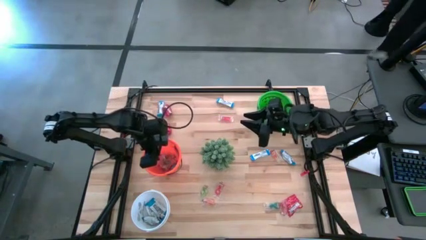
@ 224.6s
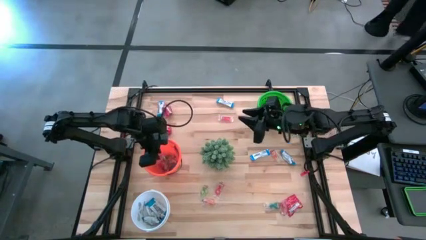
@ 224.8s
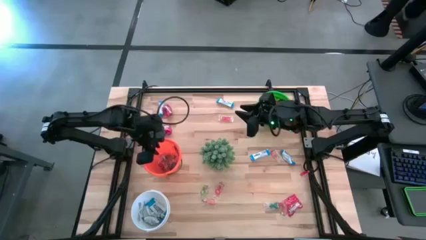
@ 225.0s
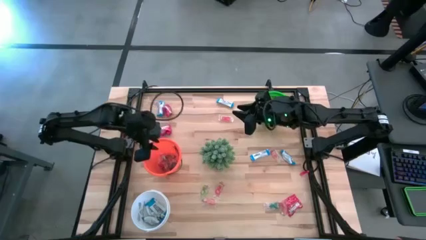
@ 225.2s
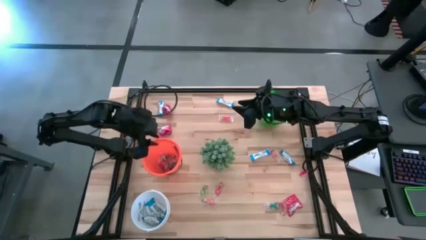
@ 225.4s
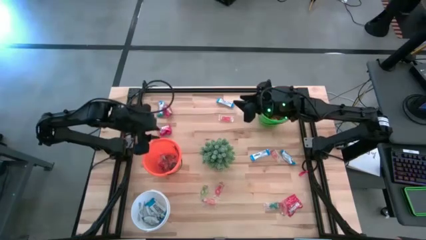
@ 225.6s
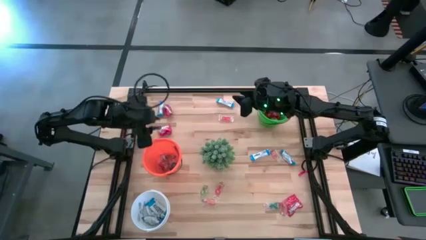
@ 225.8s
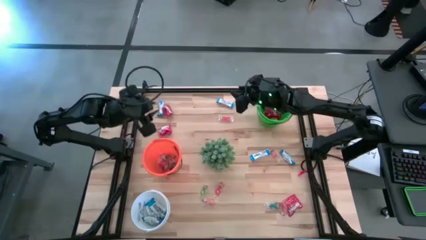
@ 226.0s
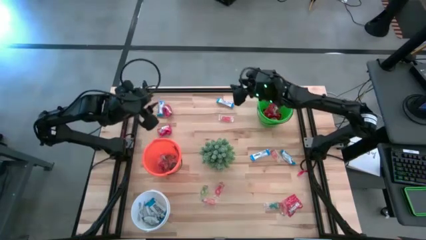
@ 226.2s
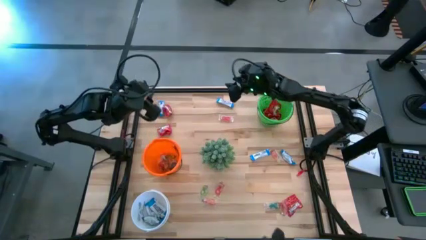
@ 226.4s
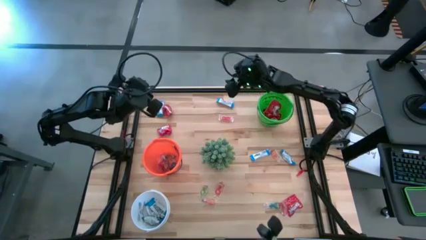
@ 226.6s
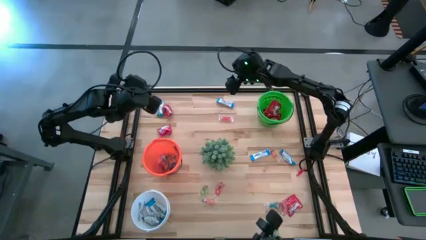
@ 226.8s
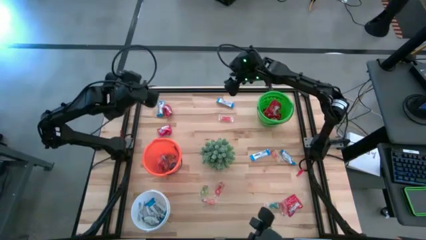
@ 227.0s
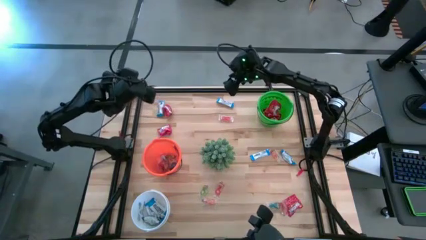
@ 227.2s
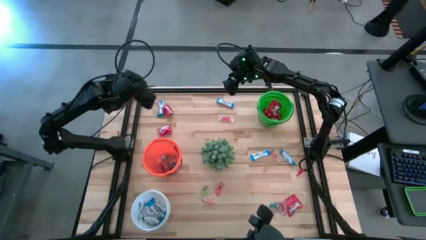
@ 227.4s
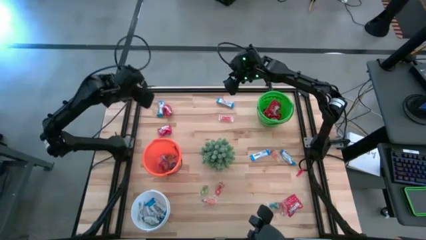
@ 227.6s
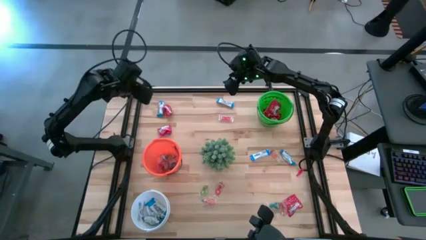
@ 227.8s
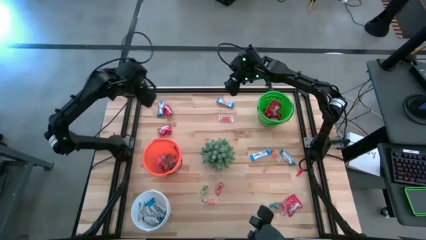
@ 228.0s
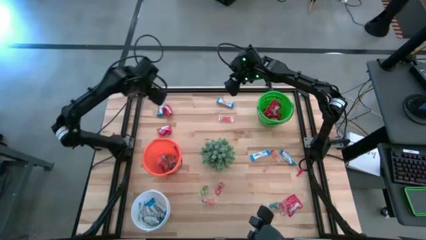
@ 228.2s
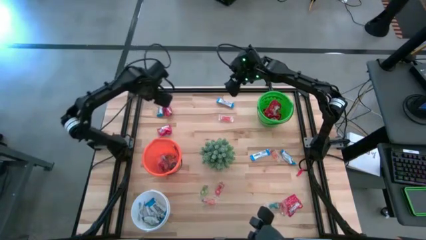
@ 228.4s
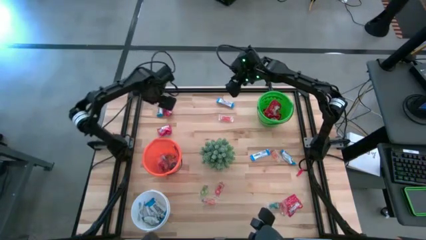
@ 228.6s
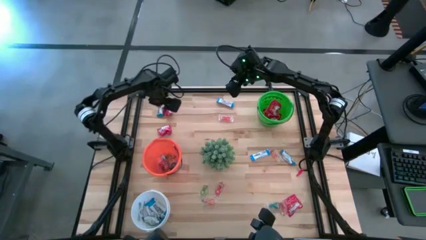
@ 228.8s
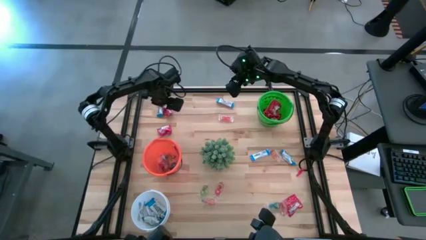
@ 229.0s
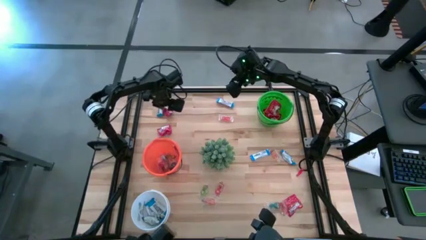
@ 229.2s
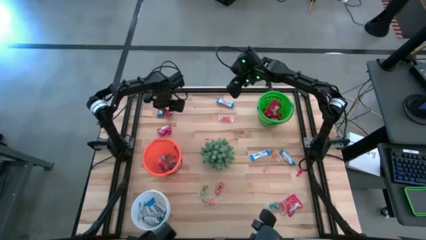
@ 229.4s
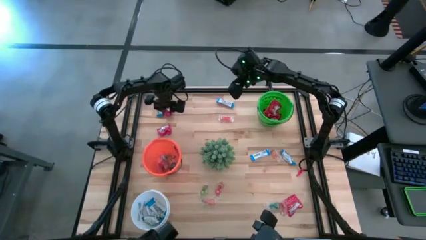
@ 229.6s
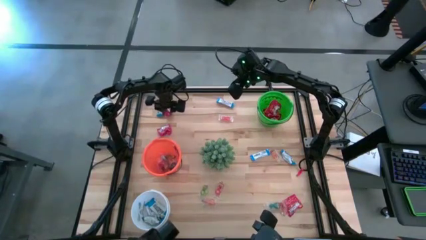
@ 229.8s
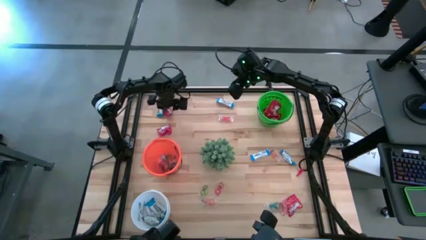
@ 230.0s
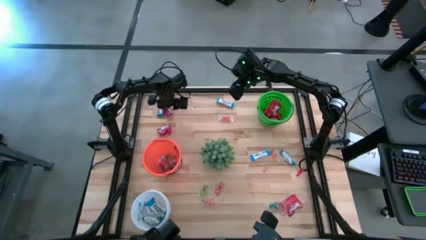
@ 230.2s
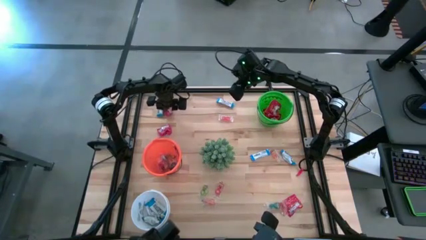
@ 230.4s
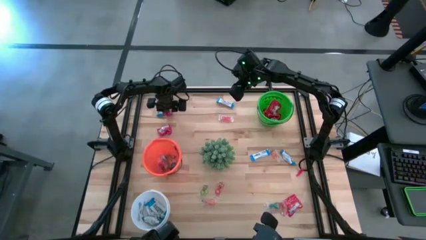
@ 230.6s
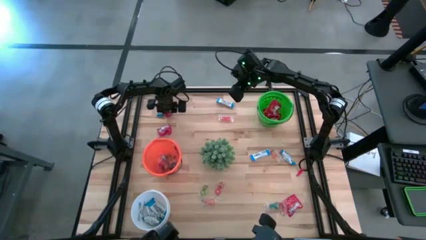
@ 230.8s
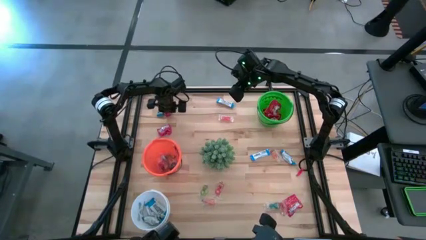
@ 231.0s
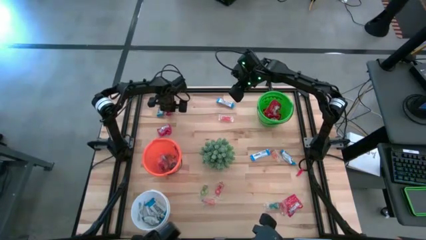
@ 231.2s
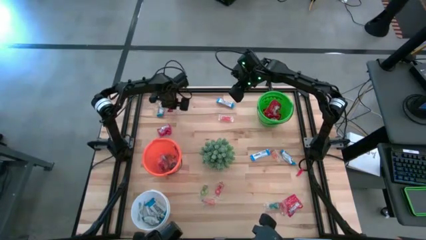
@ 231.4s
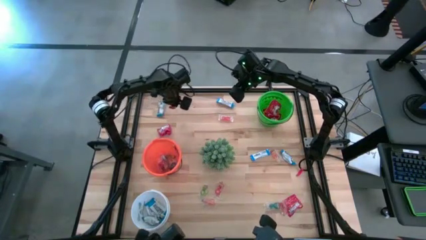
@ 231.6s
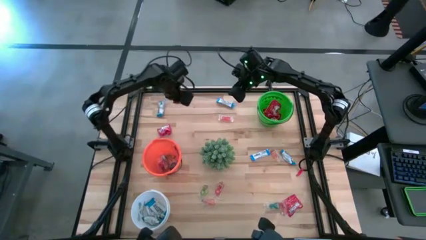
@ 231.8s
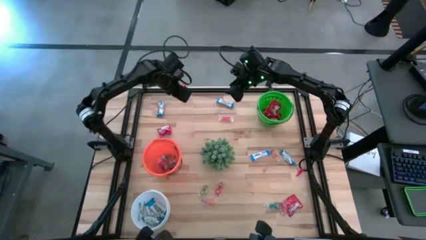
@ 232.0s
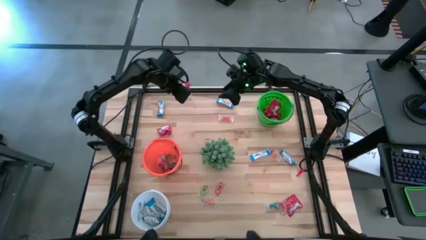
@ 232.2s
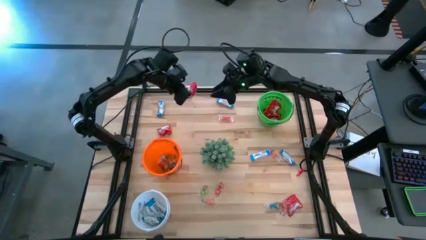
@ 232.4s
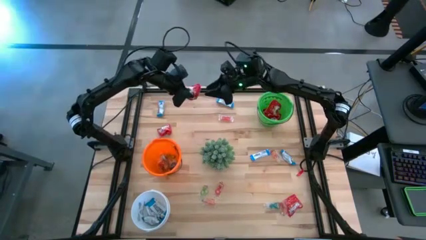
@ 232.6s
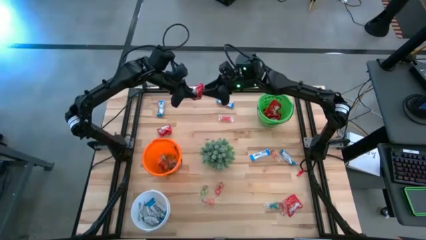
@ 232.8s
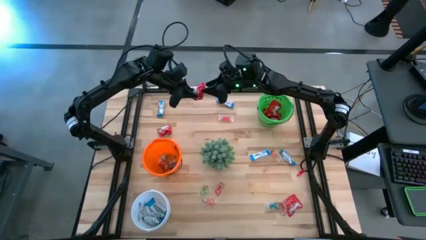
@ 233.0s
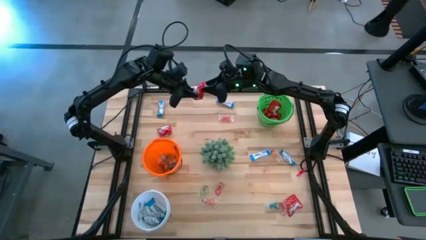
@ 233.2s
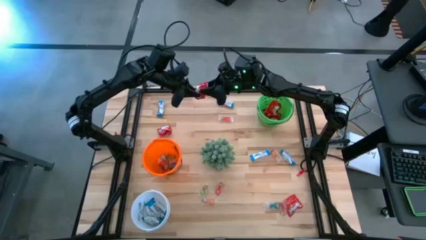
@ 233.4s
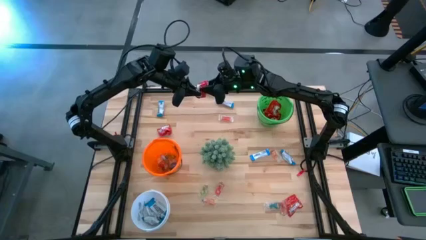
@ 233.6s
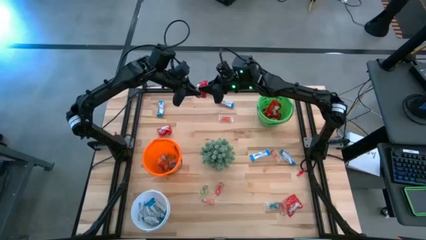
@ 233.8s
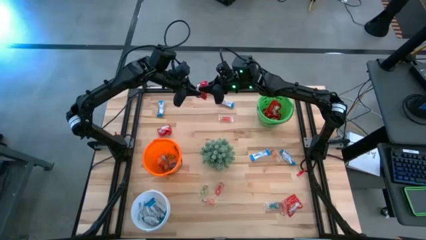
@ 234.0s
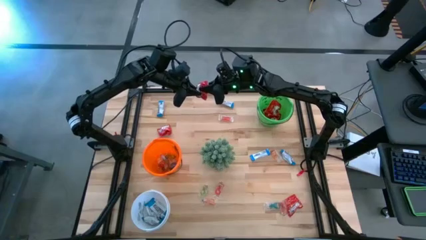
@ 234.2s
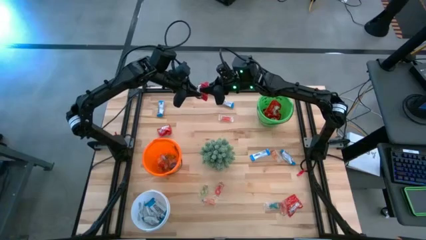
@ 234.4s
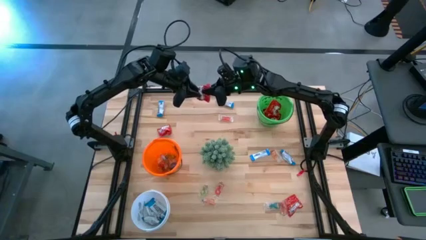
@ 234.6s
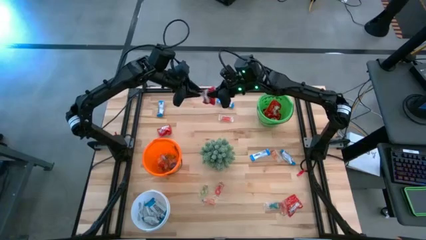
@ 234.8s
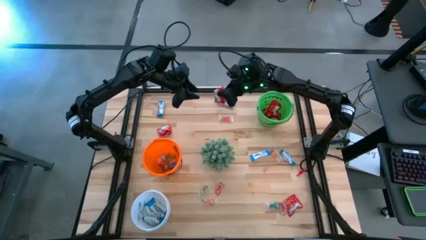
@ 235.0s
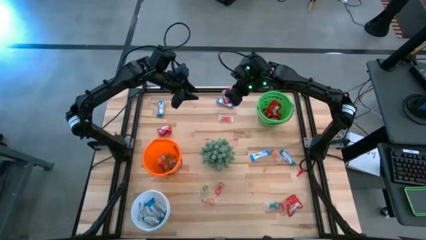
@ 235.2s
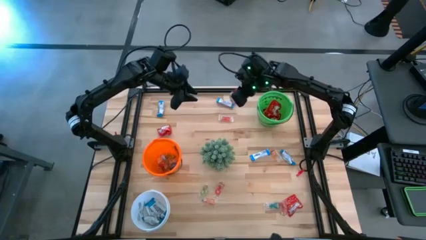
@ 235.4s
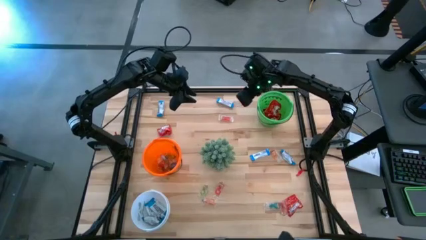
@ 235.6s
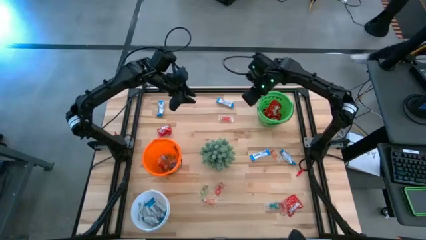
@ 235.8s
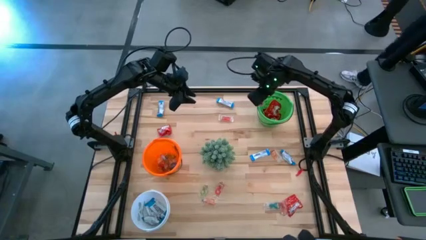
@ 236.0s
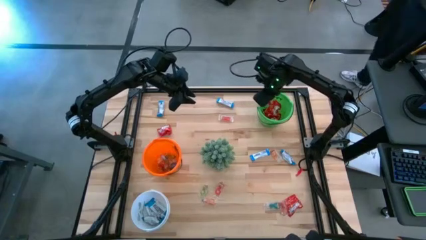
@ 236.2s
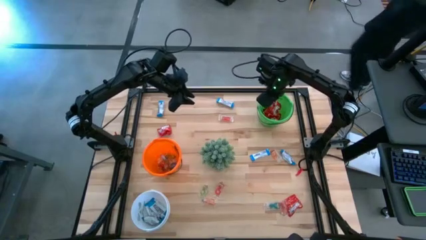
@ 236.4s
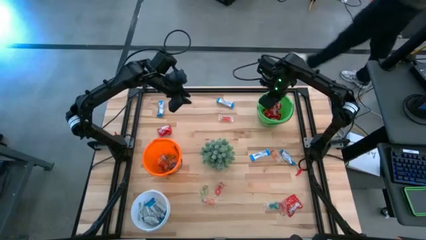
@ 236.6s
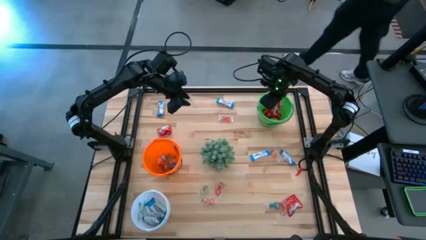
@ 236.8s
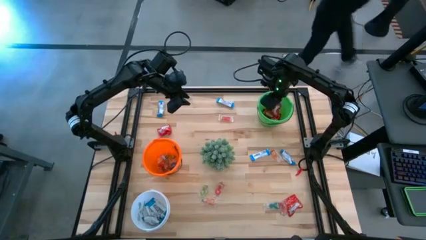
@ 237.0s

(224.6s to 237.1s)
Task: Sort candy
Put the red candy into the green bucket

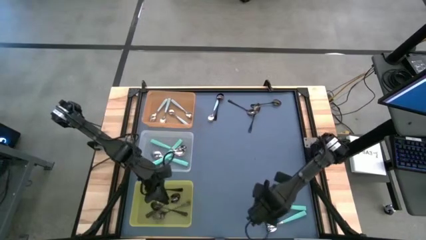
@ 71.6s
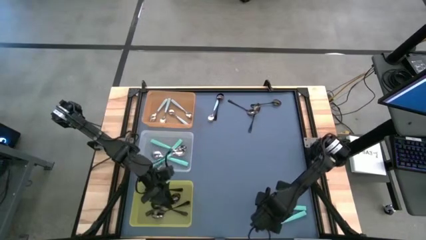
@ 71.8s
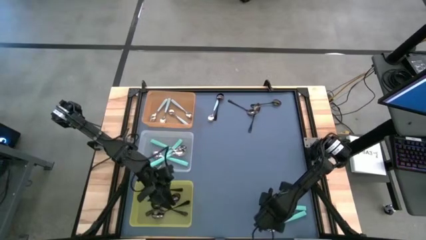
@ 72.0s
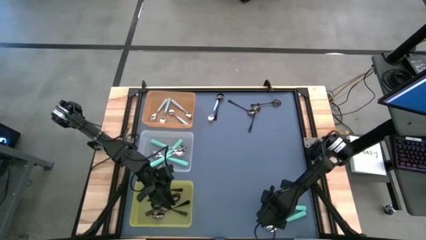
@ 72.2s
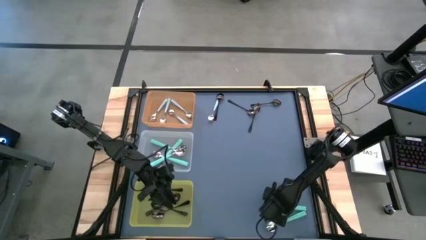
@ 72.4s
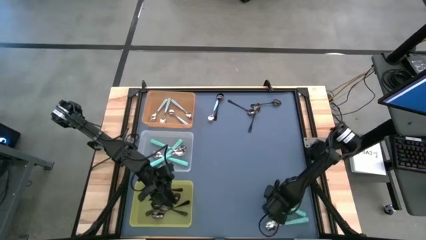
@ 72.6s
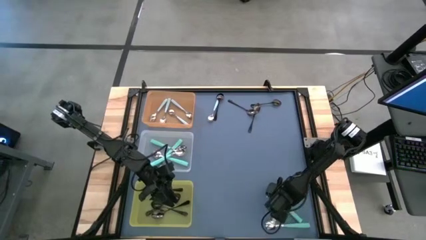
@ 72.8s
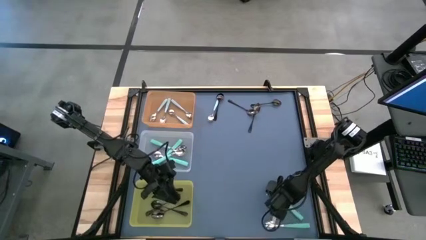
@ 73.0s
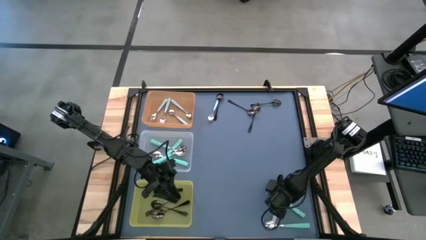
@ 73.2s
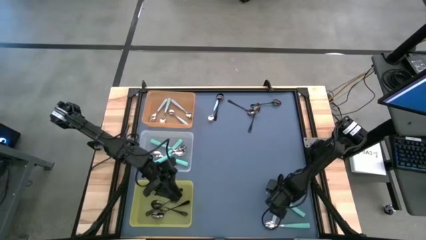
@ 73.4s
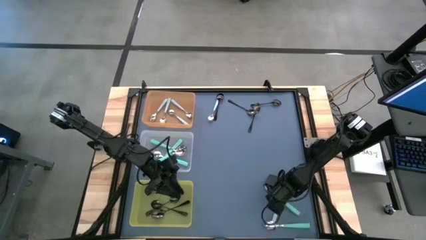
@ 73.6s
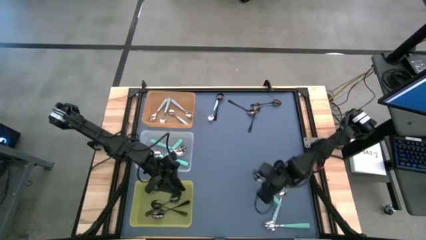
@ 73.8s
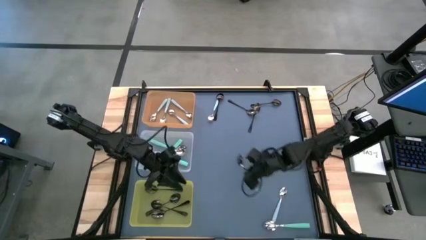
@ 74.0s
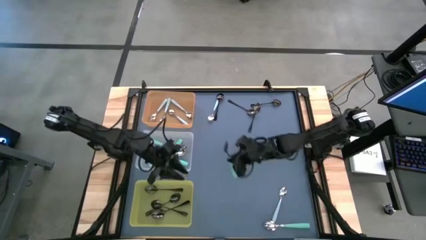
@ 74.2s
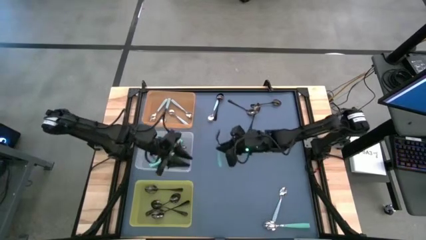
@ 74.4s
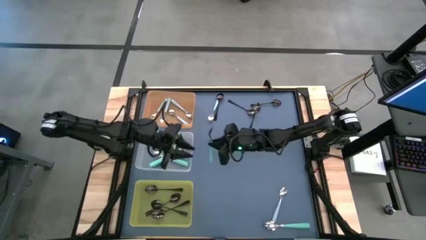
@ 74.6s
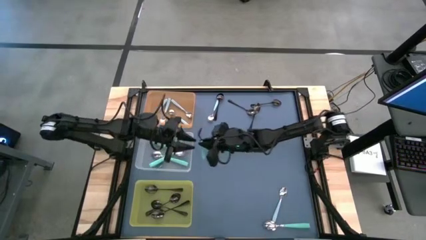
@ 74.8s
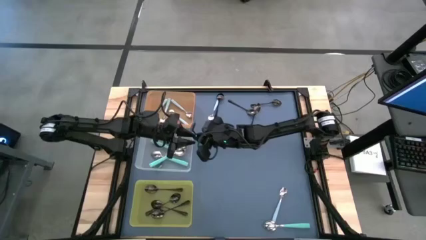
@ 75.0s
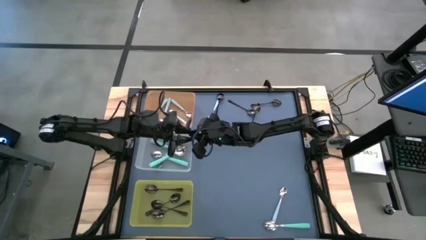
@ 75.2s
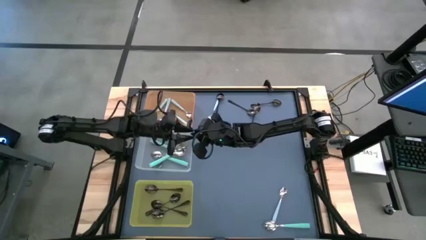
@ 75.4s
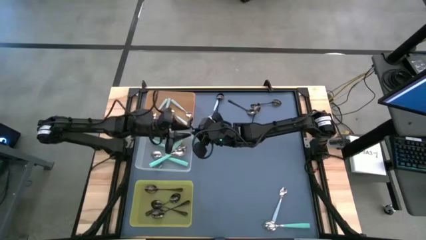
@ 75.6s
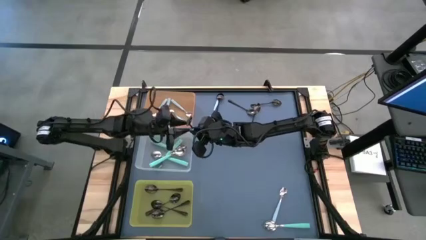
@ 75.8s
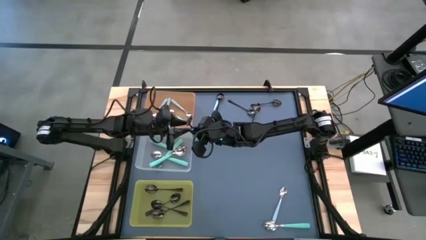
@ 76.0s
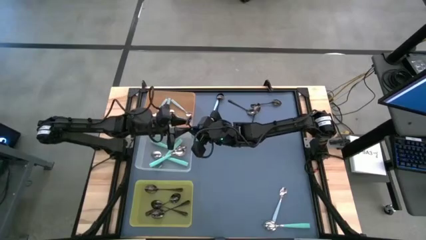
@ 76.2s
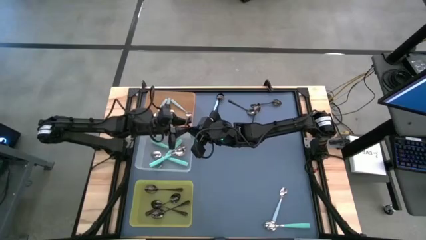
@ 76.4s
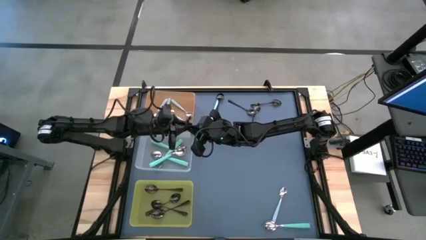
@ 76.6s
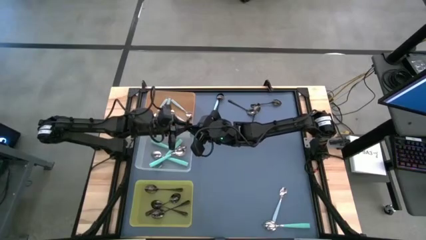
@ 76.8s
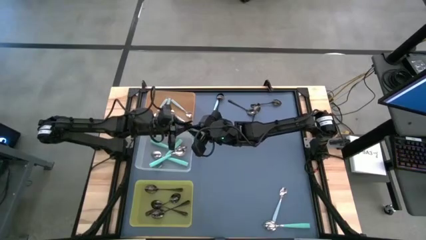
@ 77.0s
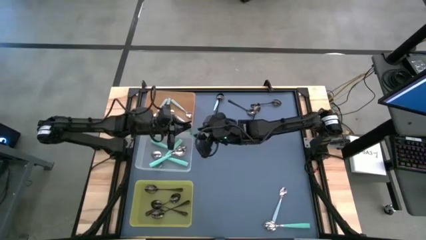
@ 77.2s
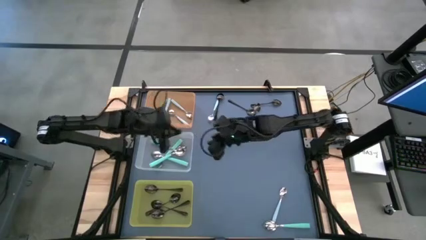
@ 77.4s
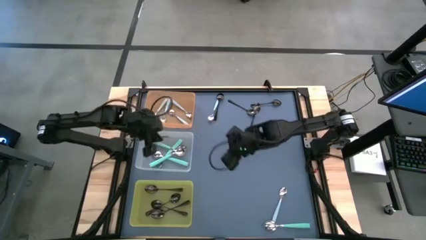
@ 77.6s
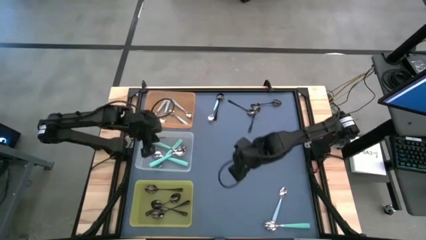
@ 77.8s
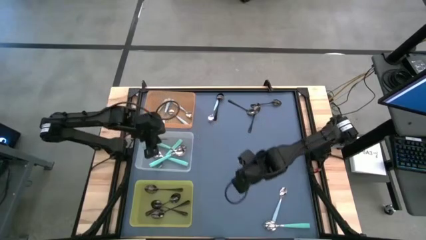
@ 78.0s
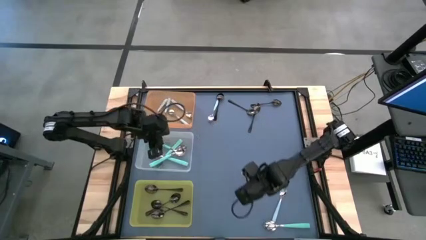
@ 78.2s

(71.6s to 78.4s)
Task: Sort silverware by color (type)
Put the light green spoon into the transparent bin
